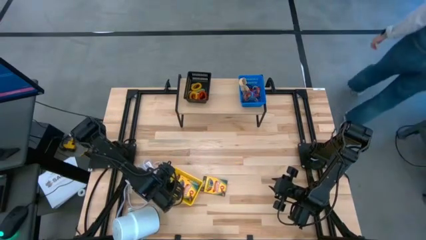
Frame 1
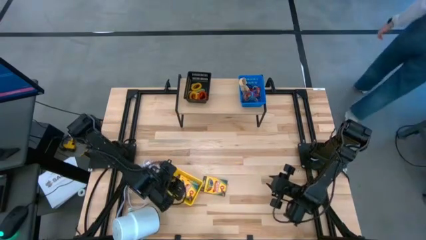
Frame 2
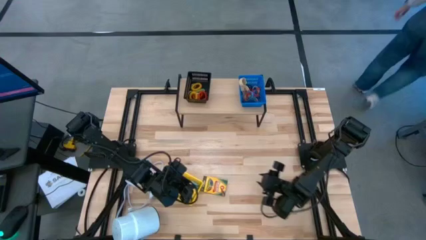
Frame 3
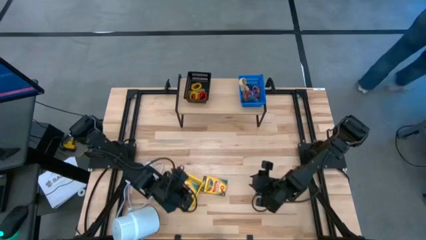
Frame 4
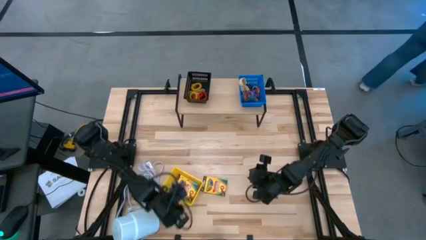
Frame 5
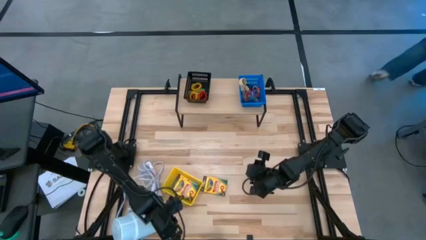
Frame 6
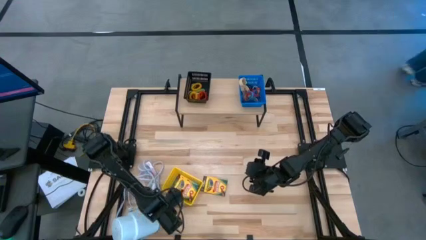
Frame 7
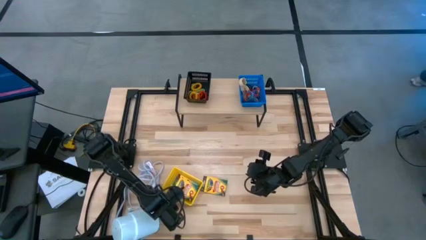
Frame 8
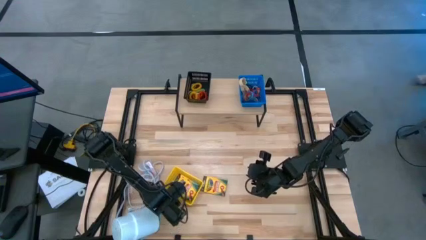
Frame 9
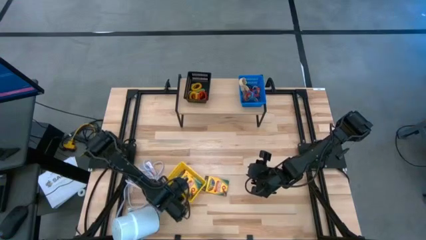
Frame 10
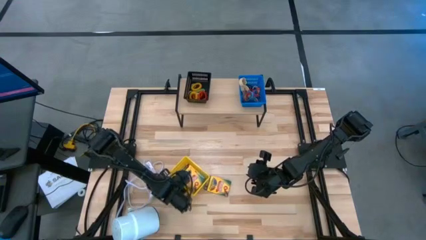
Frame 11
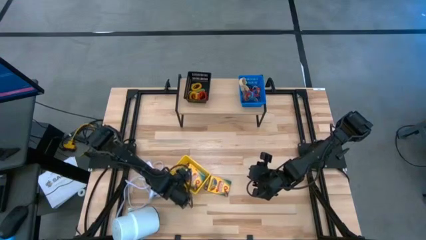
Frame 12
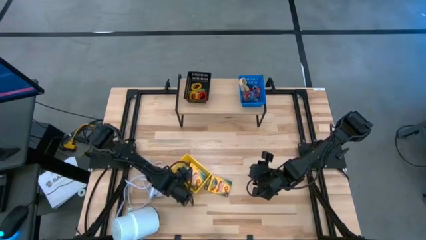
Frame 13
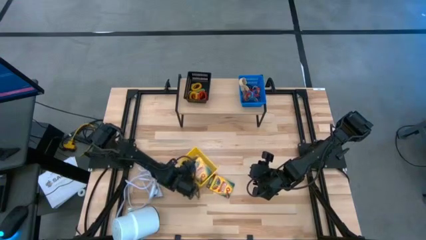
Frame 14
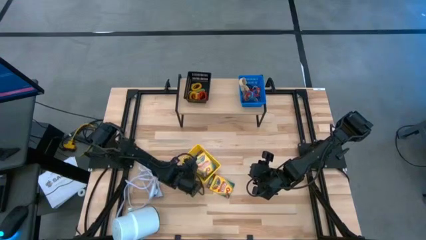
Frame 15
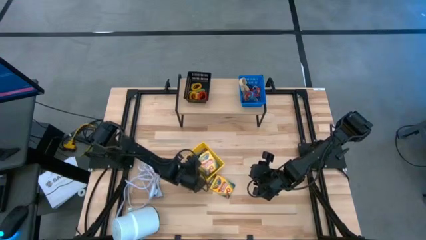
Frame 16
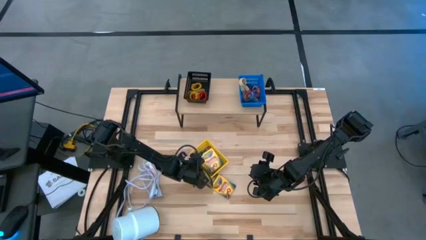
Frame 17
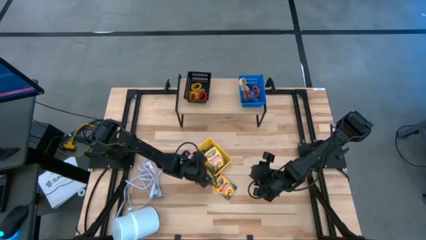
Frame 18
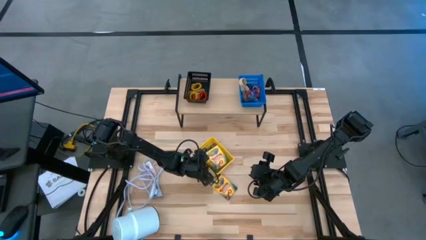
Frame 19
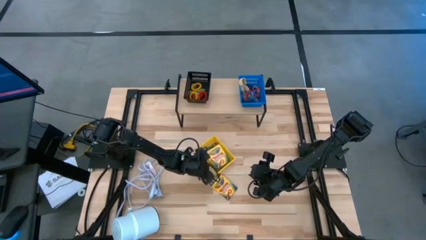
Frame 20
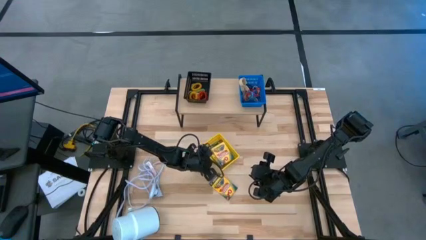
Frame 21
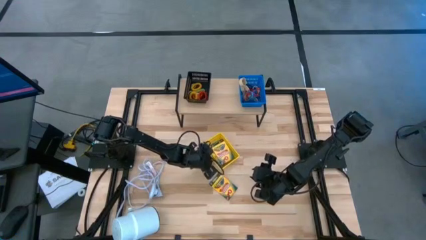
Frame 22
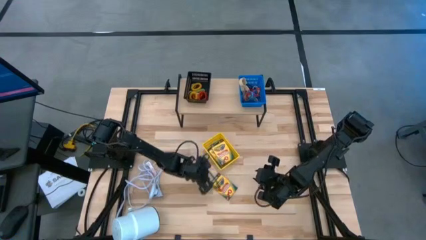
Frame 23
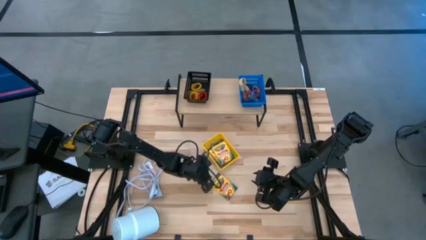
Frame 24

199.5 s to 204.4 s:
Task: Pick & Place Office Desk Supplies
Move the yellow bin into the middle of the table

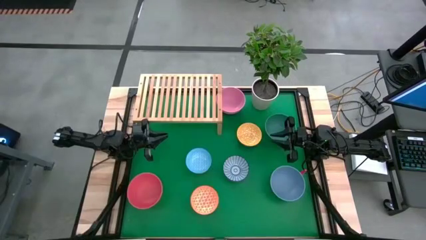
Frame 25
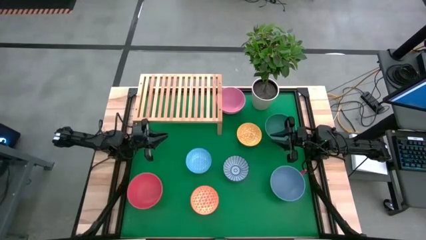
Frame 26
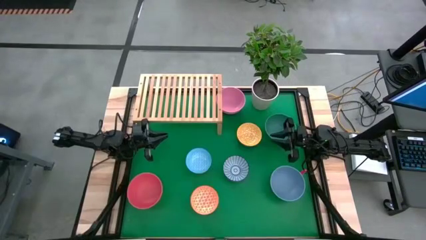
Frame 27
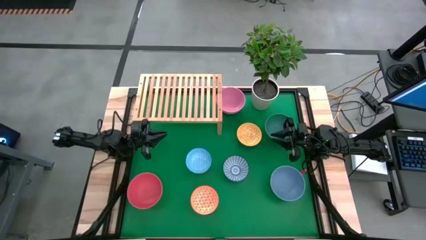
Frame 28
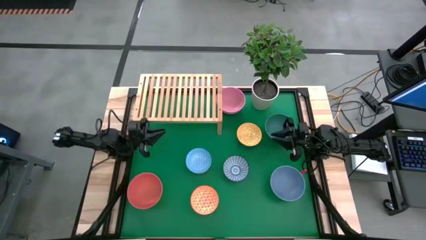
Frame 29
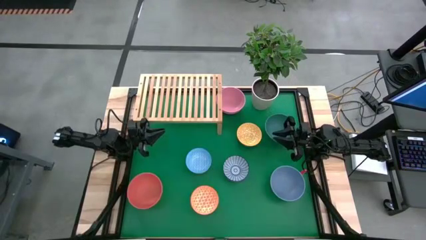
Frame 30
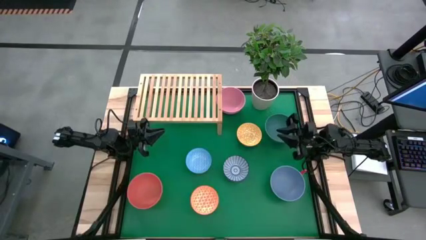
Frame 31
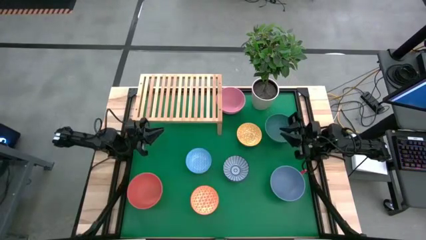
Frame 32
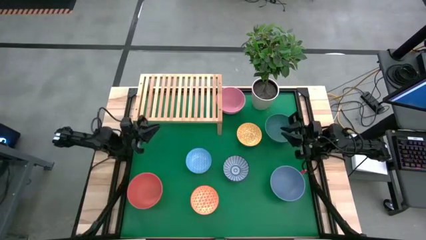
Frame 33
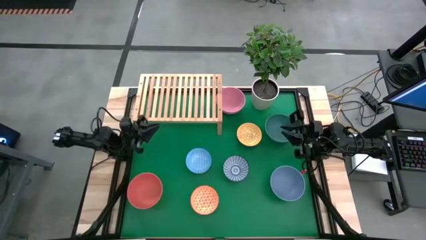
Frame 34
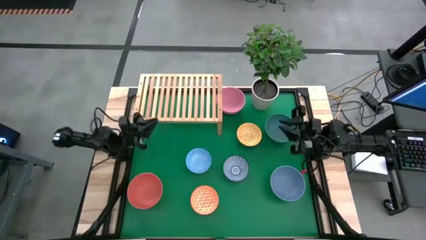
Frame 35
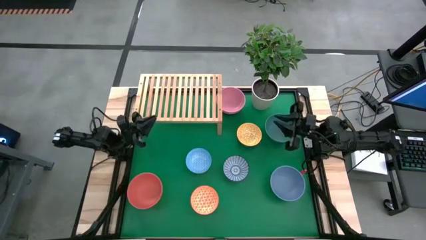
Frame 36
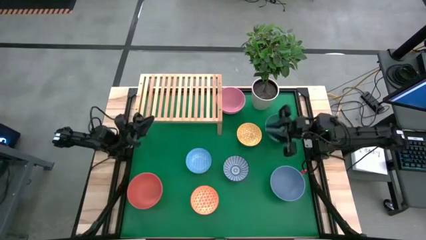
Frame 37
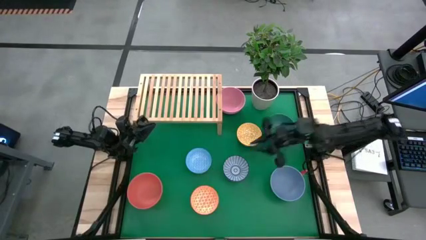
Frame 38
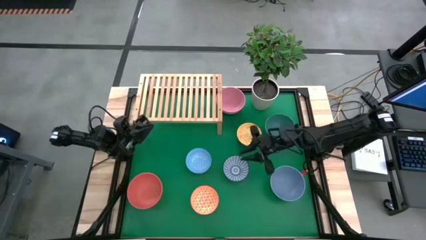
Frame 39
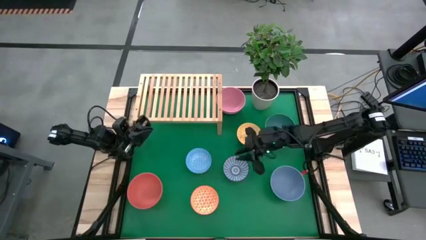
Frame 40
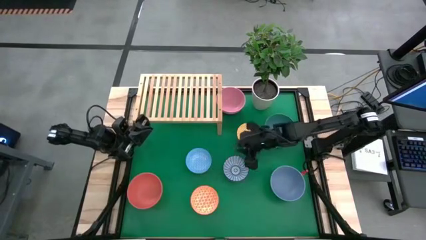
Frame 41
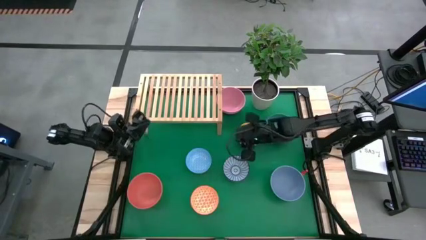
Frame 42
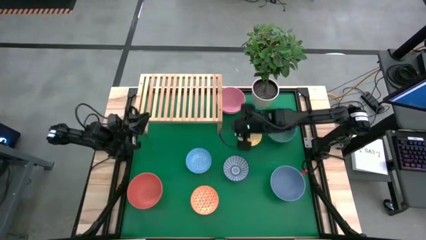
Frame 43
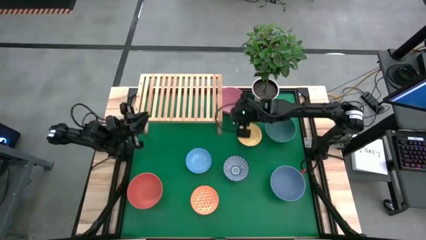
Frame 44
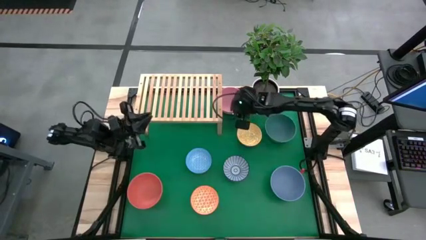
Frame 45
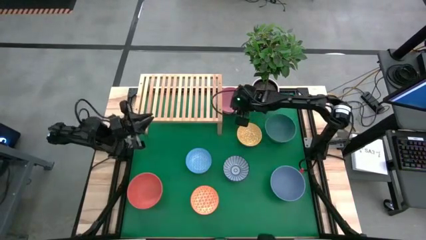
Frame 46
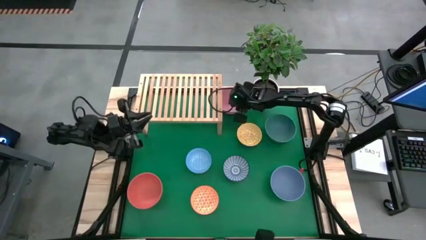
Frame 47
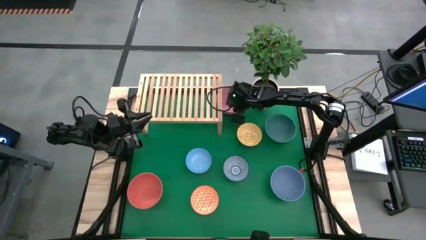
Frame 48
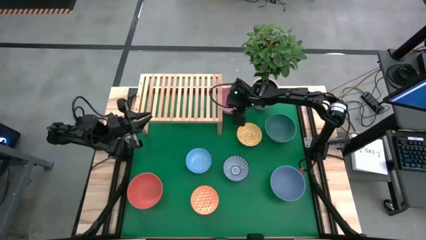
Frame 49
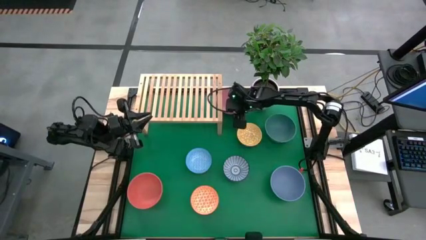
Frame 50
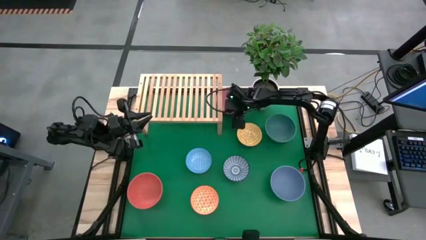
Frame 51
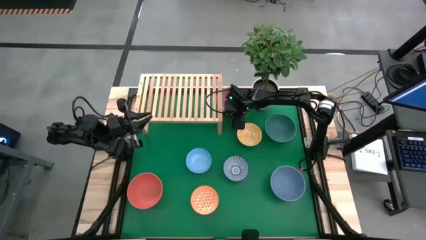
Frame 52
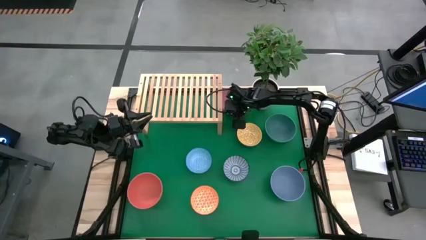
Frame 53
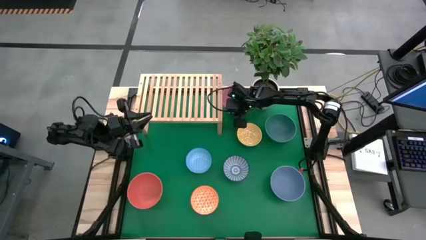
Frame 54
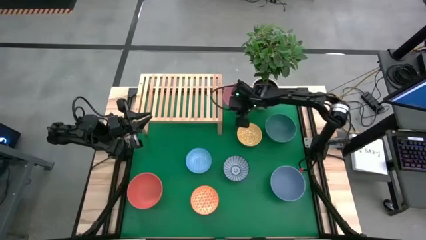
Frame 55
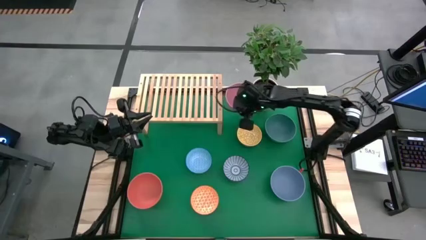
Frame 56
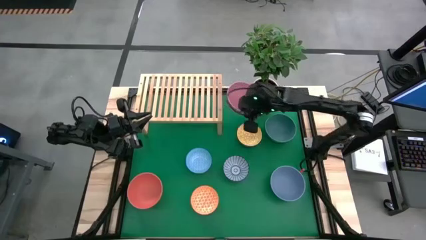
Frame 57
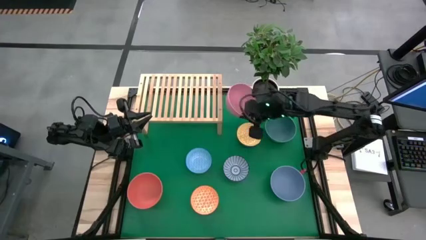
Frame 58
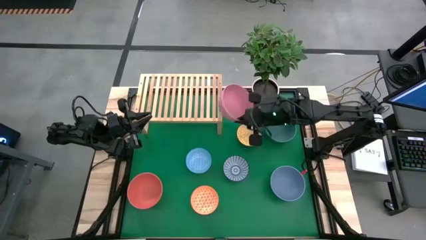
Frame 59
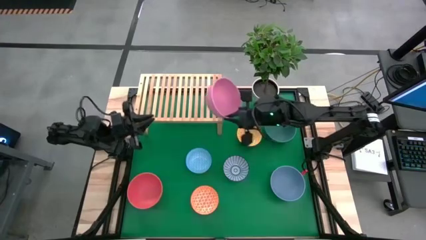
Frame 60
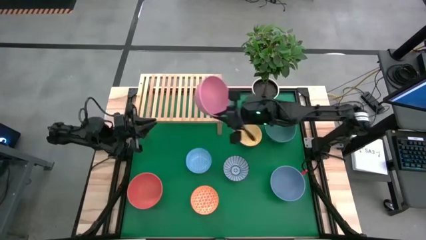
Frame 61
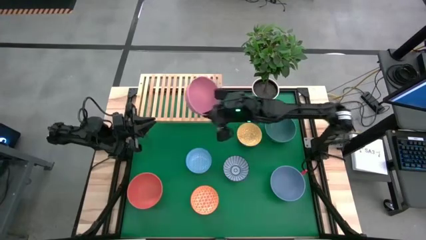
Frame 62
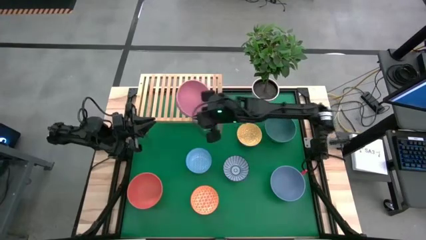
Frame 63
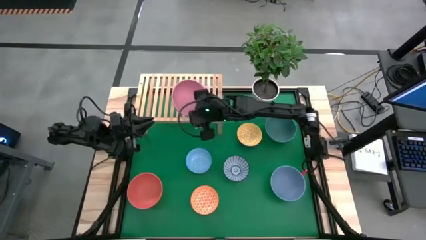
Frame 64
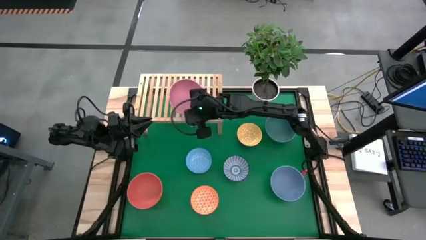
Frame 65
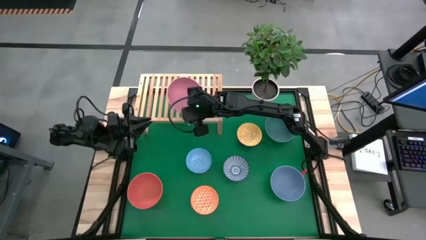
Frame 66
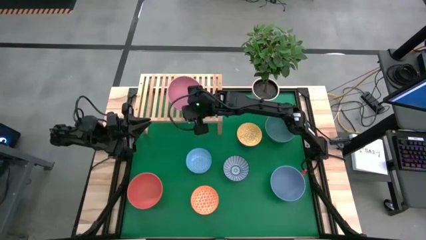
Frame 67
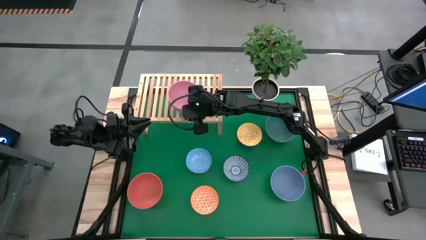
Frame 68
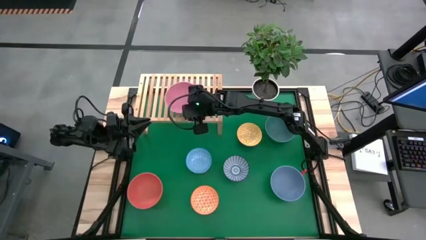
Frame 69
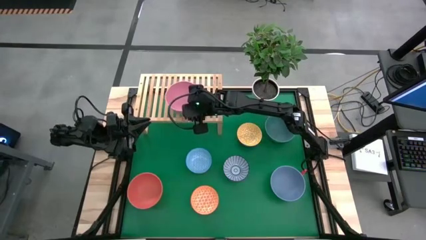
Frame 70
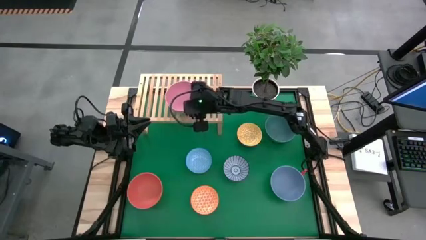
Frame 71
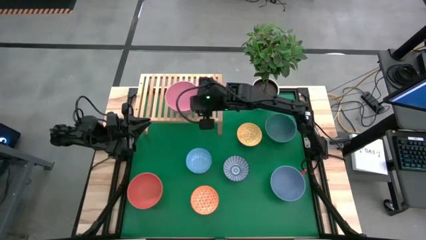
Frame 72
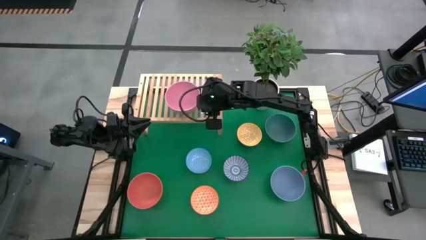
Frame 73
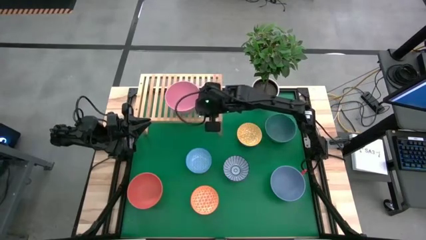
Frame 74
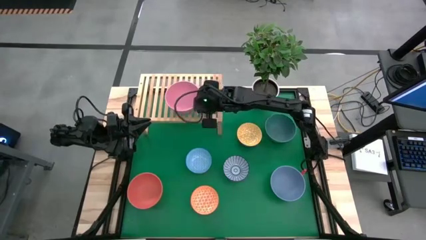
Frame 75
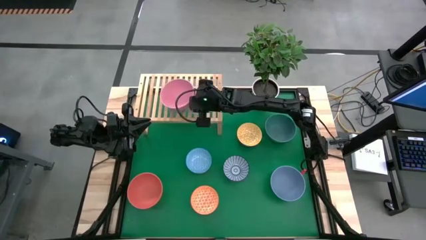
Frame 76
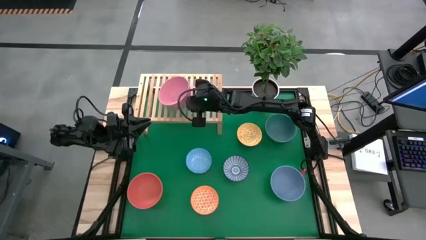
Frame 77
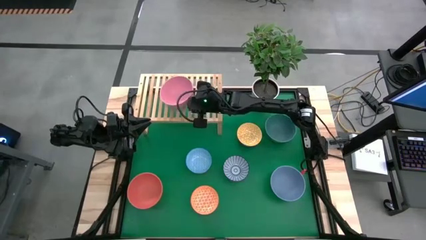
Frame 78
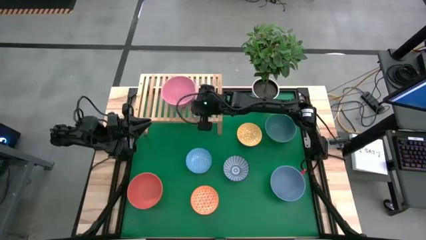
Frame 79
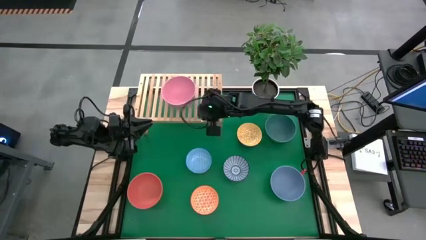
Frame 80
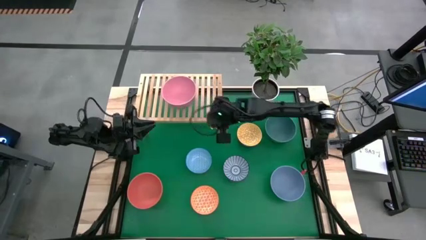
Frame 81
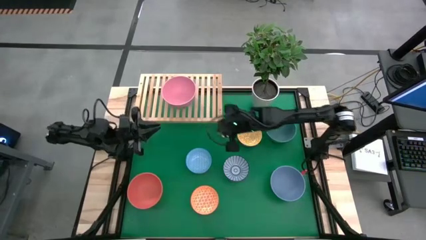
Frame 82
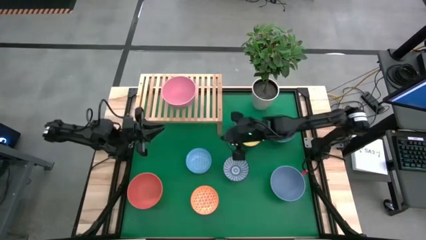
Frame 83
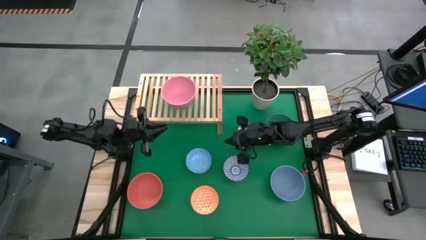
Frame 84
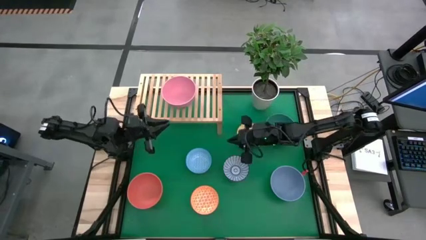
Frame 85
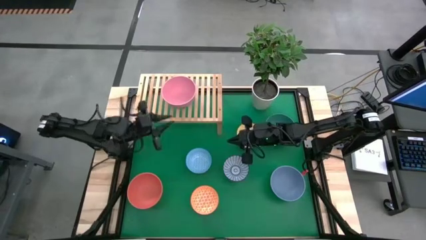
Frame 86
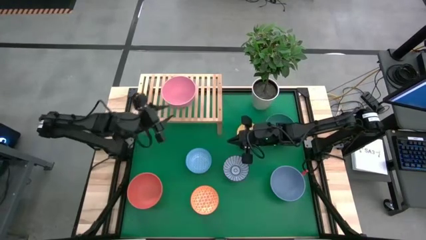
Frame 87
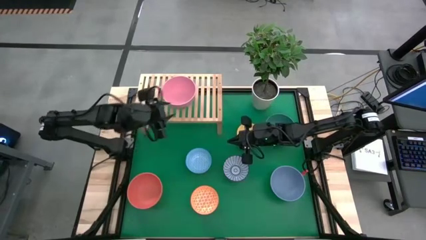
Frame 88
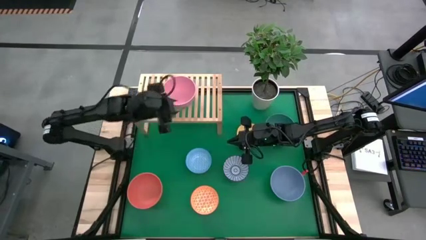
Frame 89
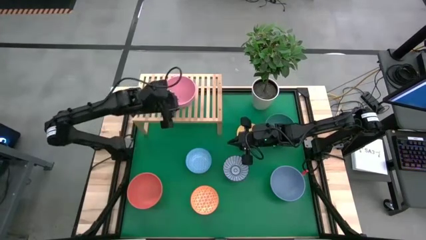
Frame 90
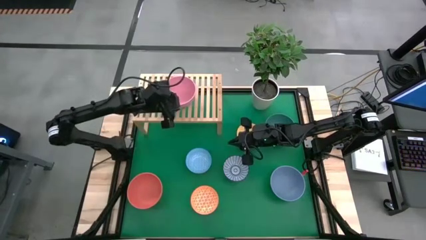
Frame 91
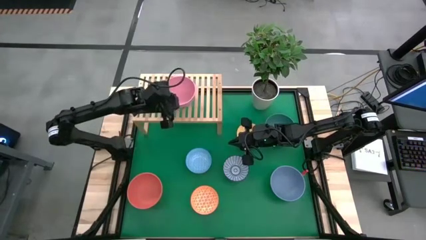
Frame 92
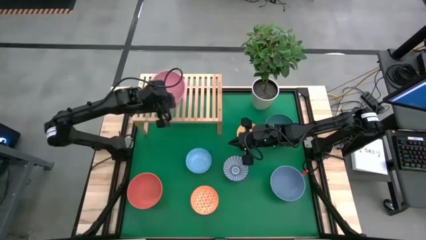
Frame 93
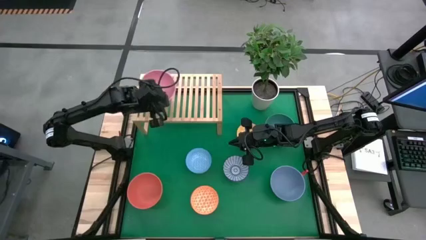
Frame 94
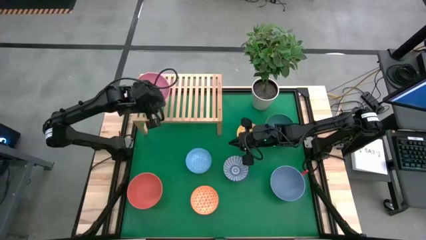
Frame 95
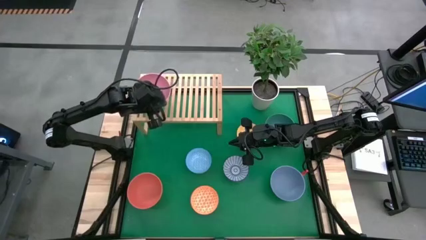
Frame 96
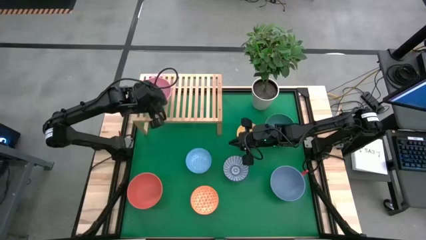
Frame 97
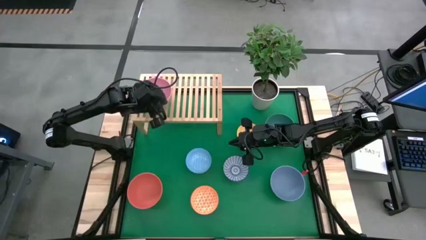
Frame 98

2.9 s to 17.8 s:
Task: Place and stack bowls onto a shelf
Put the pink bowl on the shelf
